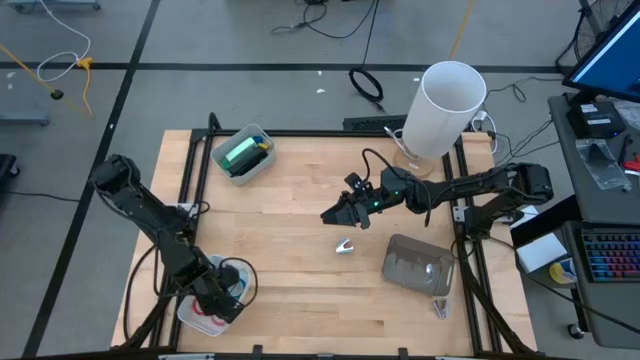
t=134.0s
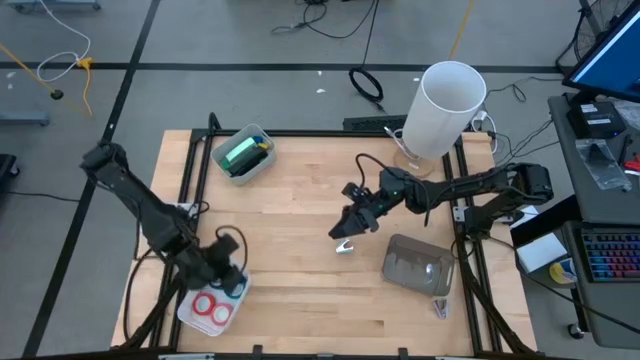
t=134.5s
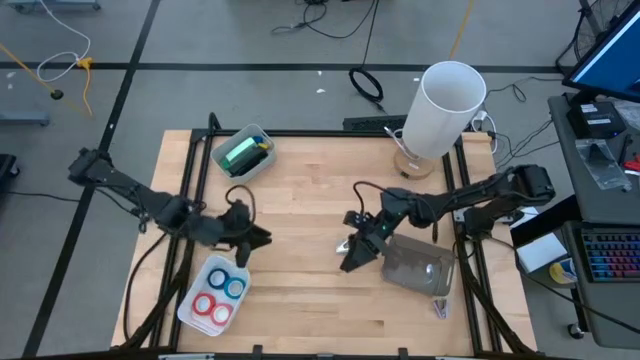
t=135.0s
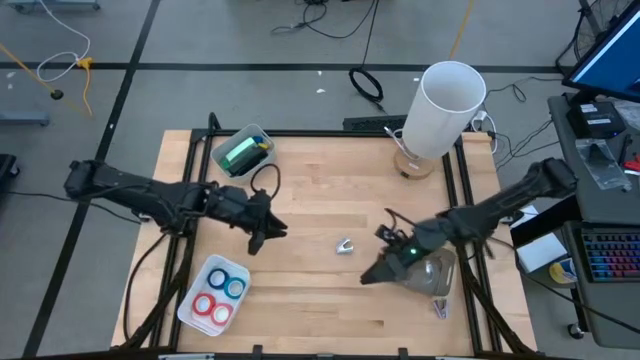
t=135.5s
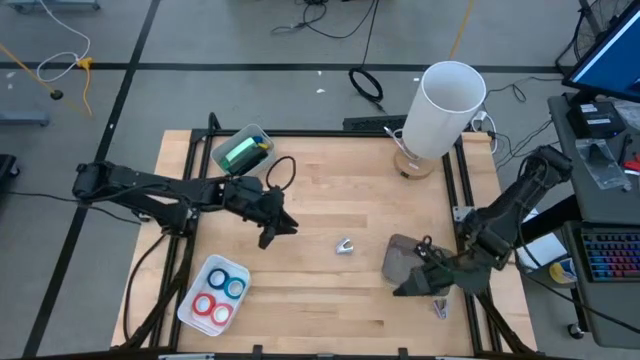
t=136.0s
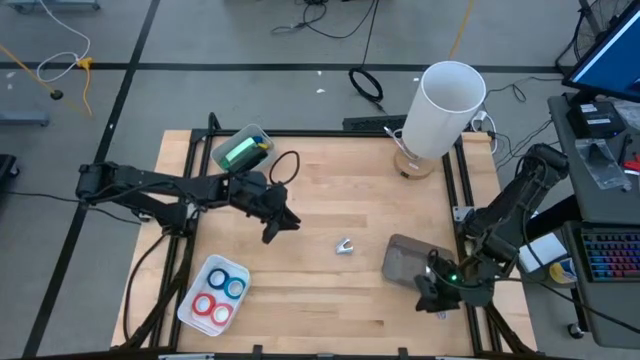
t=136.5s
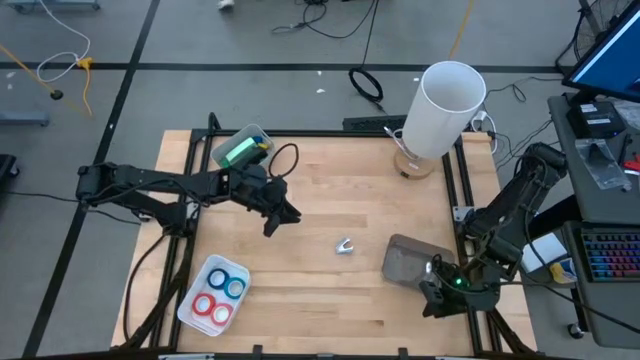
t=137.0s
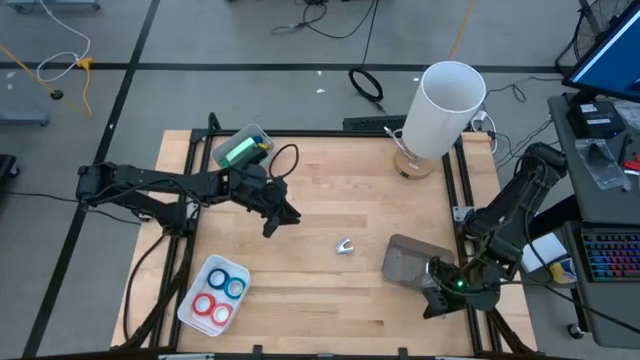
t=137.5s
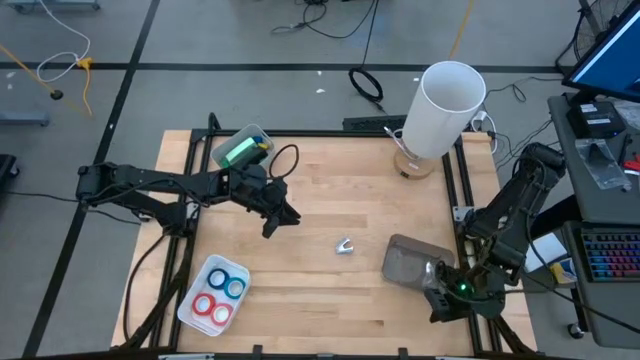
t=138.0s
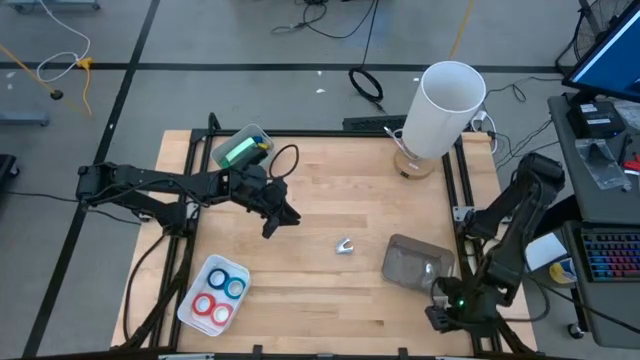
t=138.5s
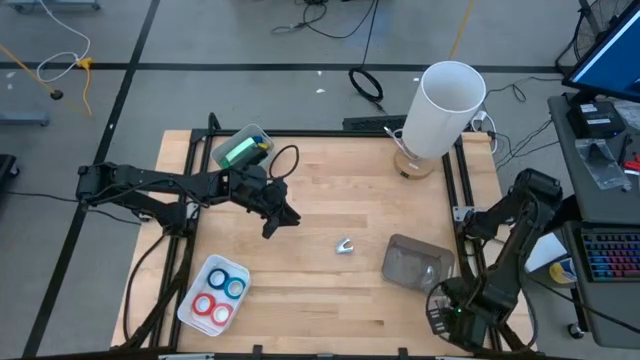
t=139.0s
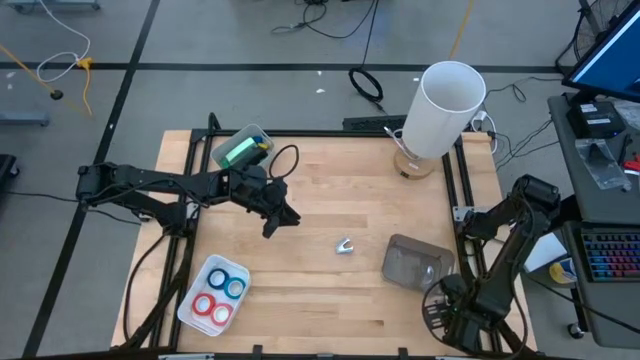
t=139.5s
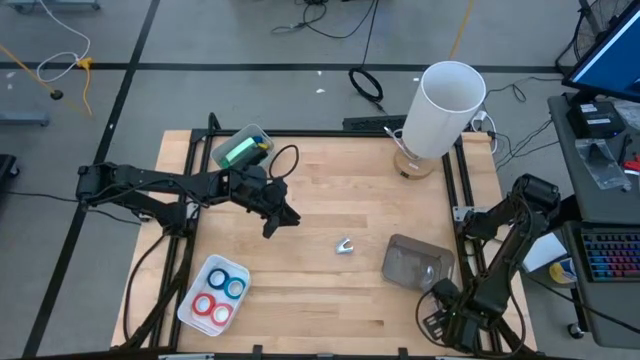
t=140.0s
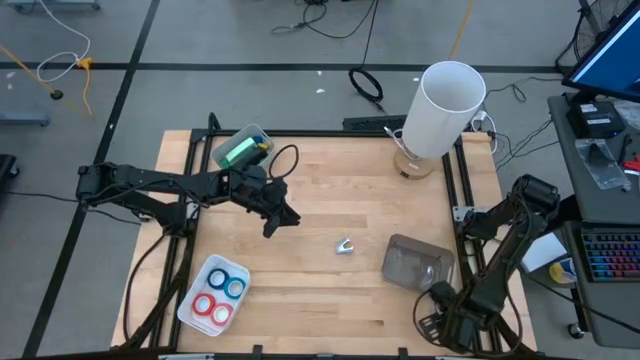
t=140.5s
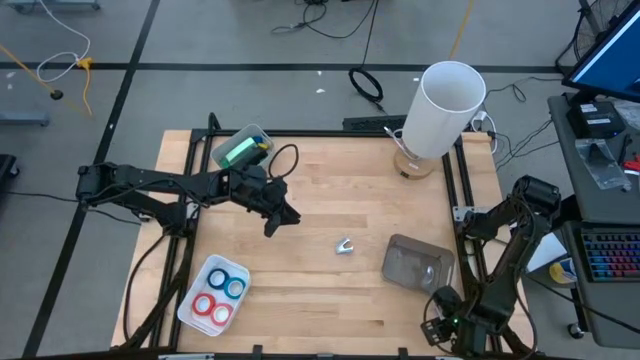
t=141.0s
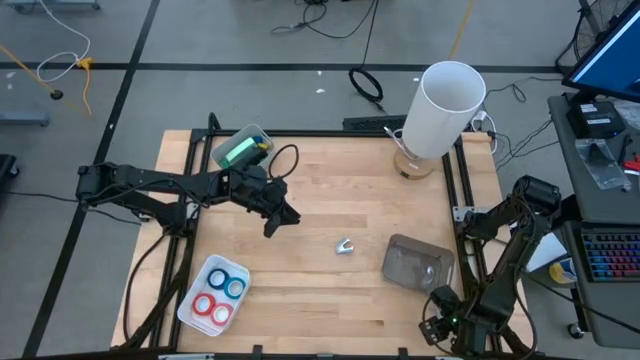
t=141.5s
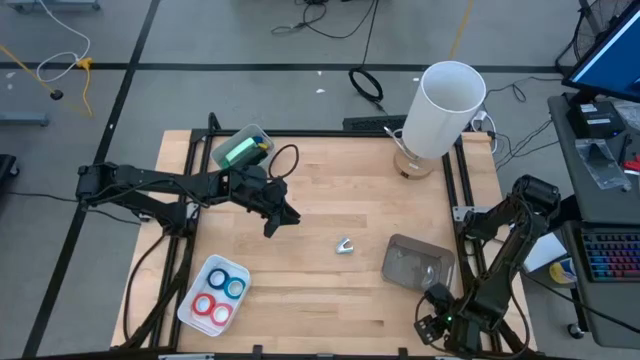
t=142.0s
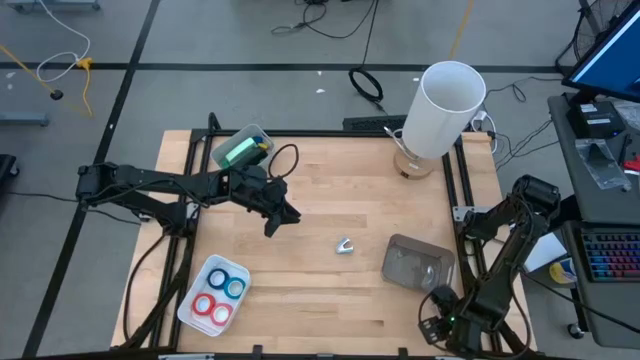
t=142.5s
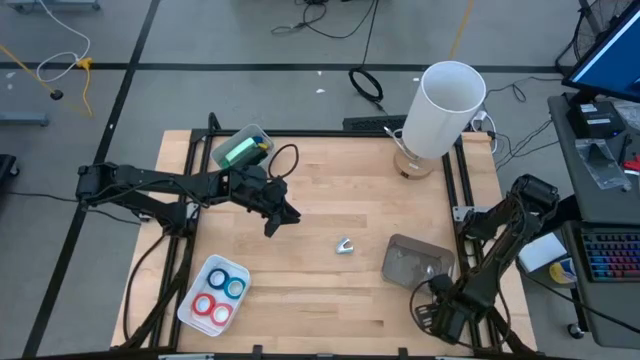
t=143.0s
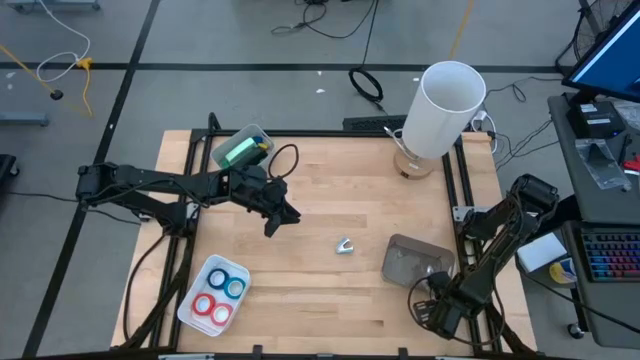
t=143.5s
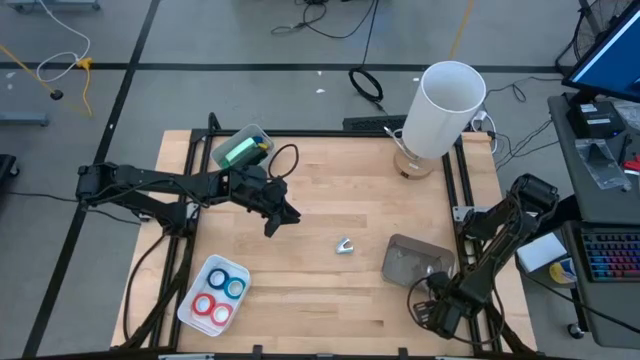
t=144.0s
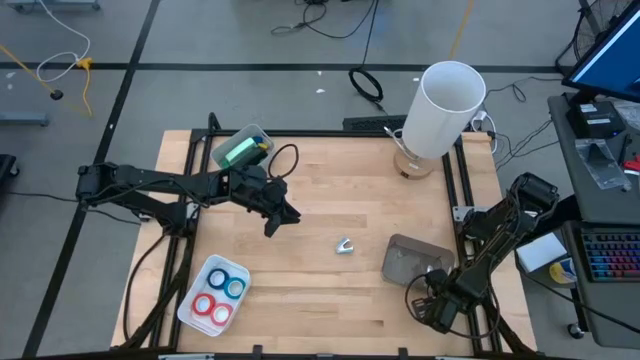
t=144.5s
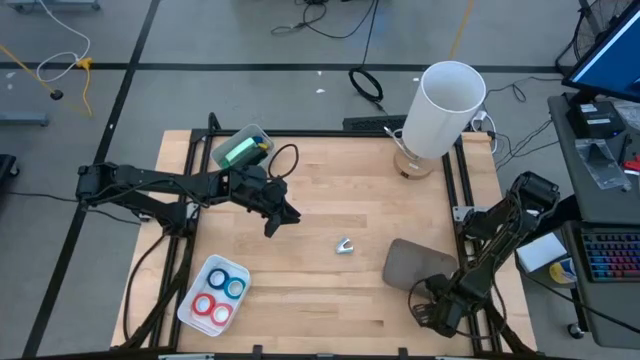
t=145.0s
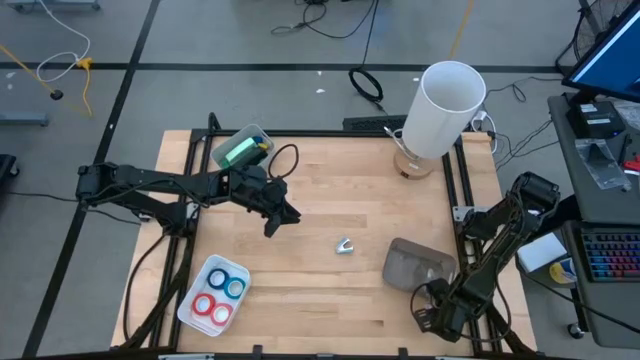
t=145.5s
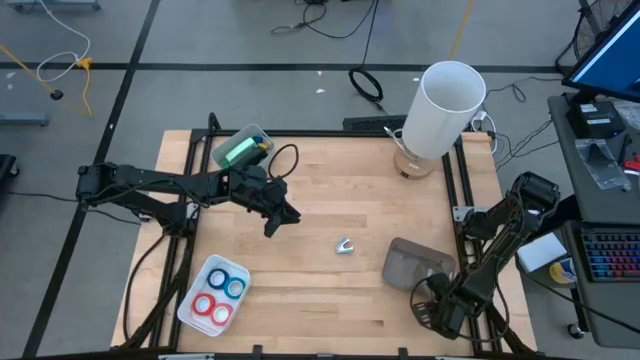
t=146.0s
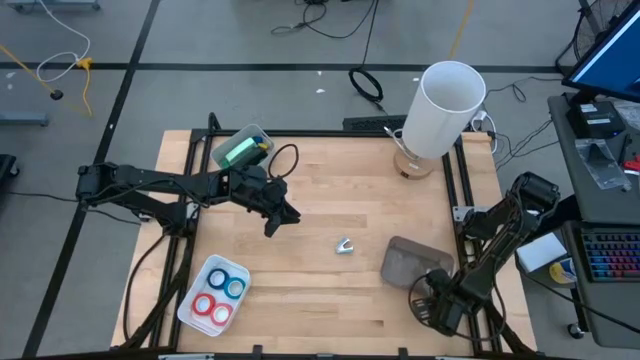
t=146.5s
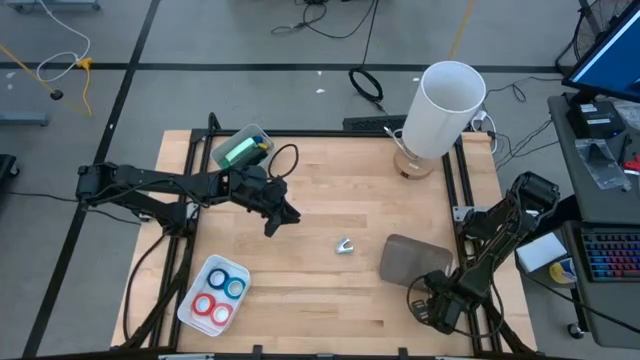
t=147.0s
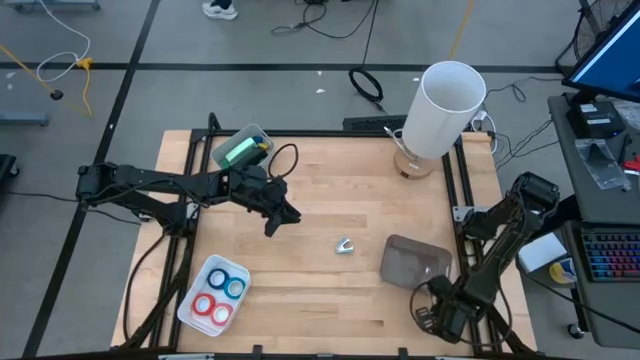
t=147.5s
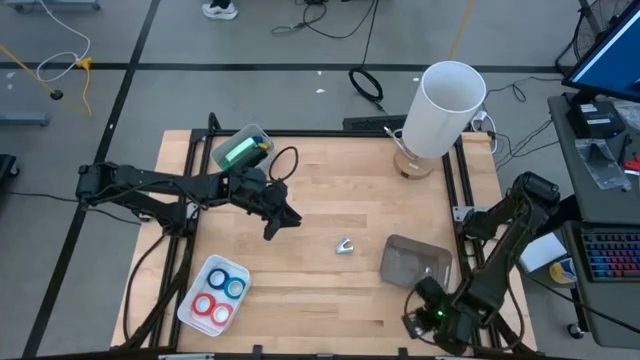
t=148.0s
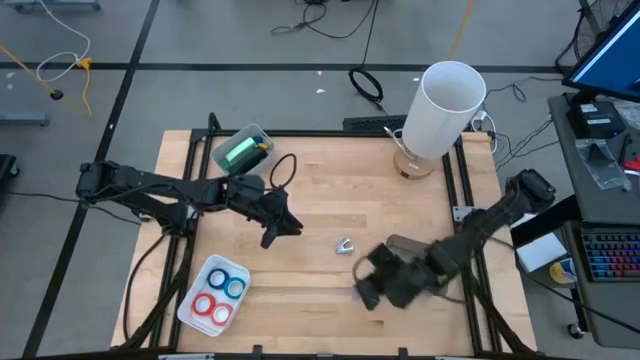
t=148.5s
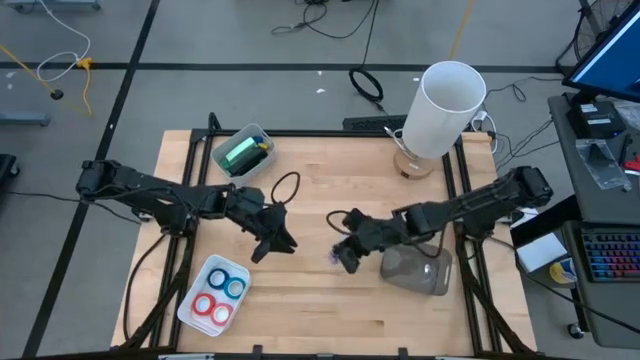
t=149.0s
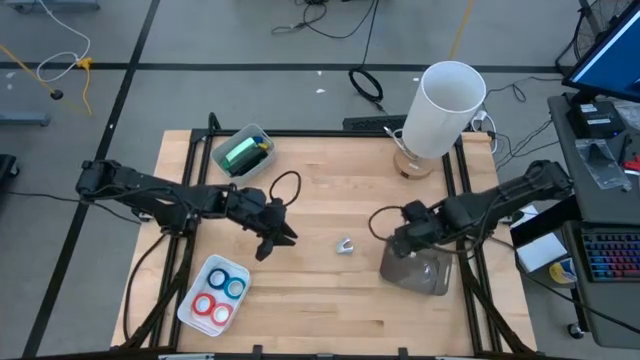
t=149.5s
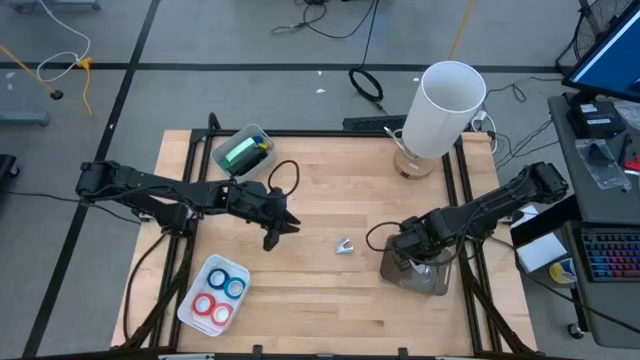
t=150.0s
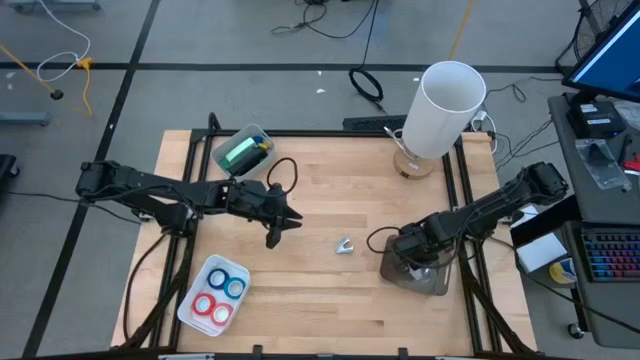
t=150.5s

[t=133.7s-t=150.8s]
Task: Pick and place Stapler, Stapler remover, tape
Put the purple staple remover into the black bin
